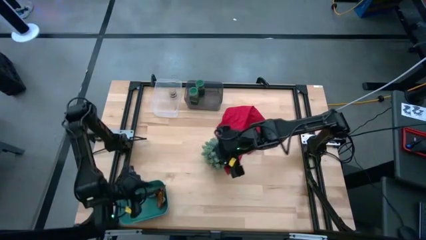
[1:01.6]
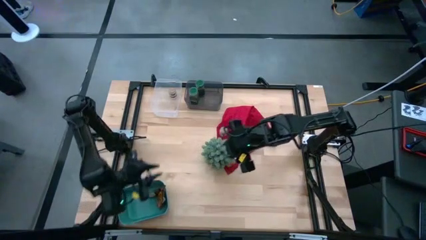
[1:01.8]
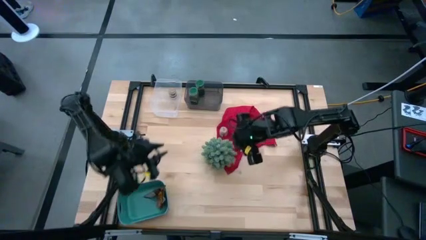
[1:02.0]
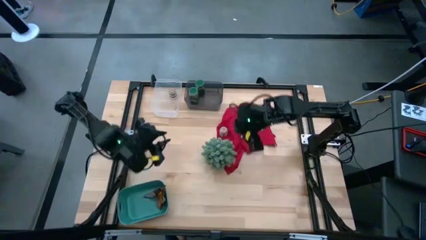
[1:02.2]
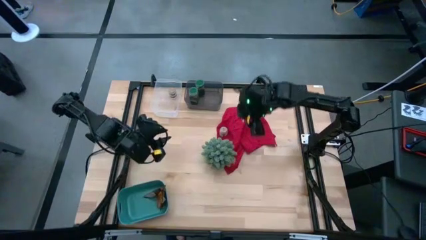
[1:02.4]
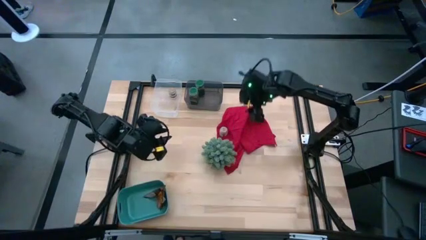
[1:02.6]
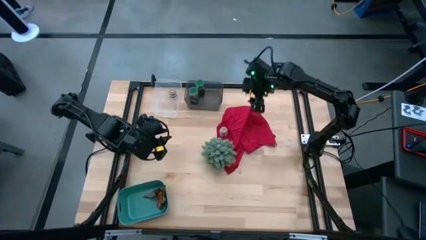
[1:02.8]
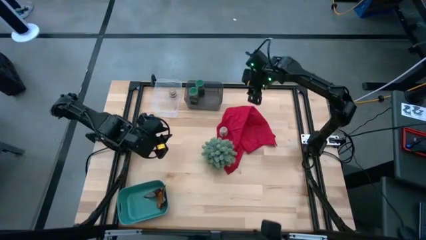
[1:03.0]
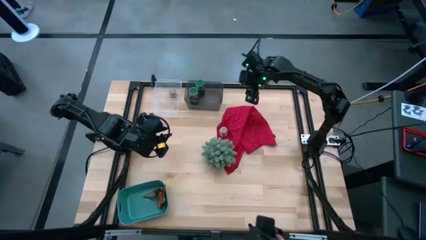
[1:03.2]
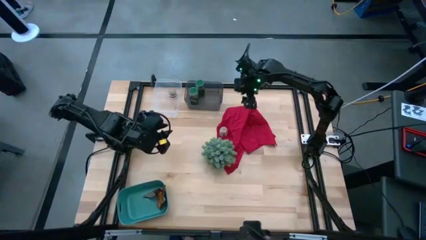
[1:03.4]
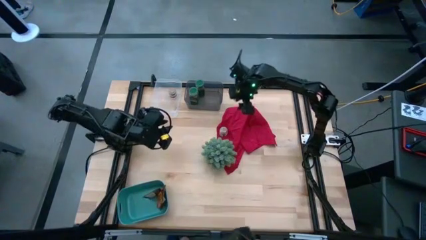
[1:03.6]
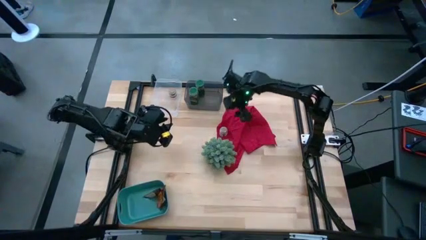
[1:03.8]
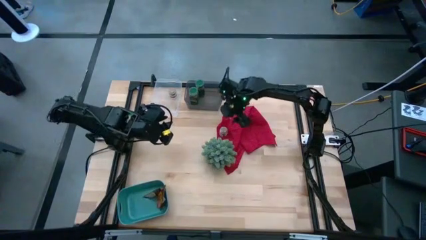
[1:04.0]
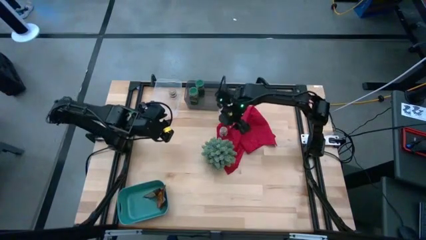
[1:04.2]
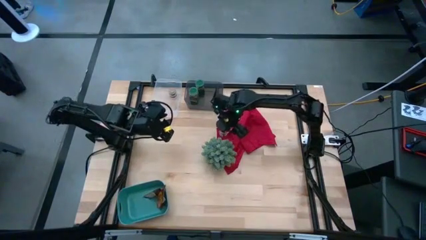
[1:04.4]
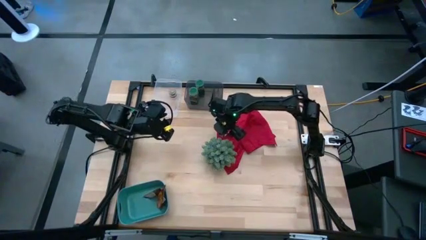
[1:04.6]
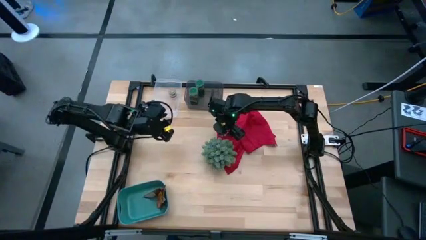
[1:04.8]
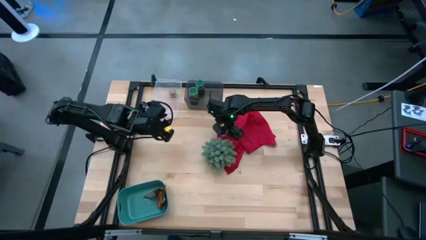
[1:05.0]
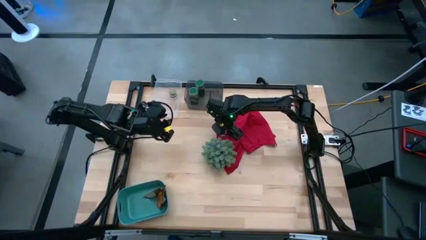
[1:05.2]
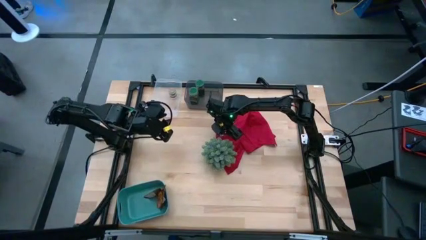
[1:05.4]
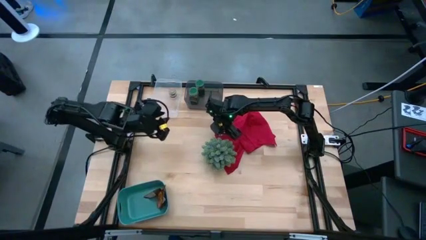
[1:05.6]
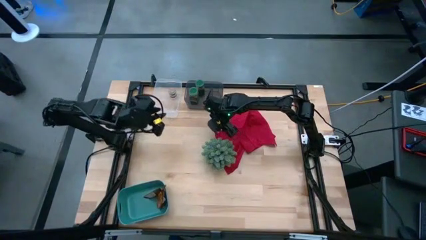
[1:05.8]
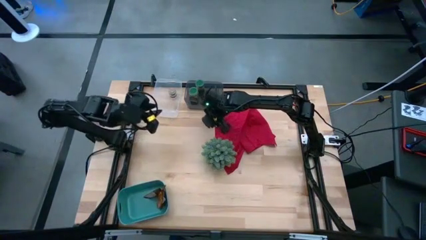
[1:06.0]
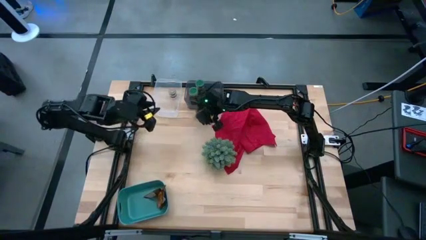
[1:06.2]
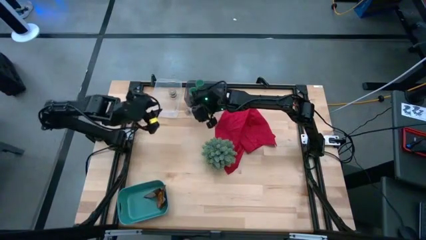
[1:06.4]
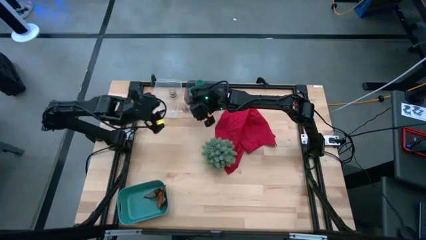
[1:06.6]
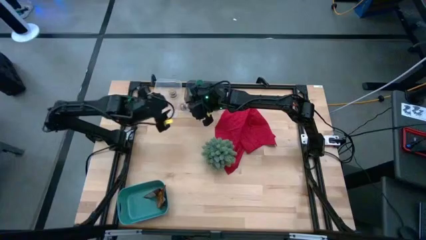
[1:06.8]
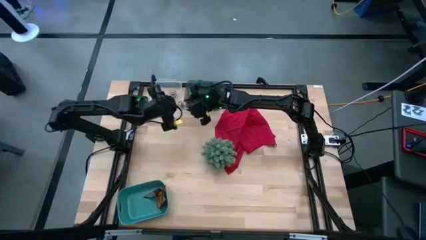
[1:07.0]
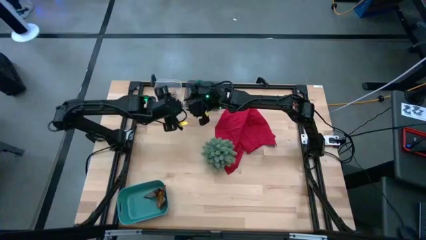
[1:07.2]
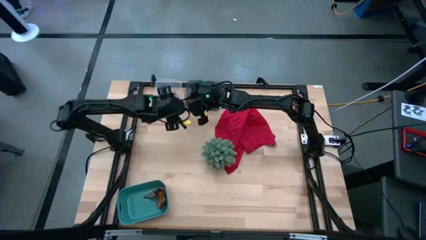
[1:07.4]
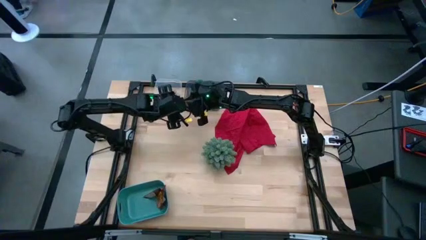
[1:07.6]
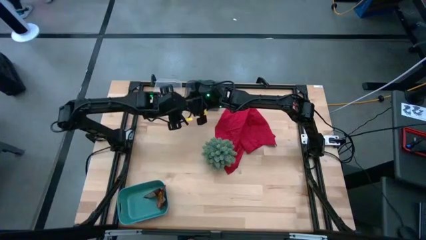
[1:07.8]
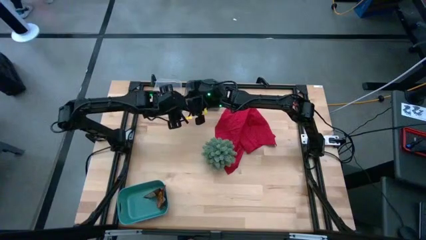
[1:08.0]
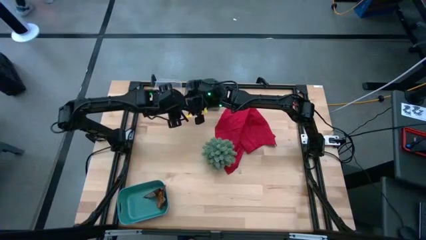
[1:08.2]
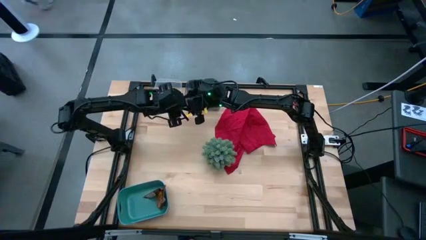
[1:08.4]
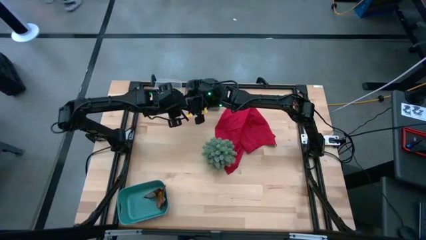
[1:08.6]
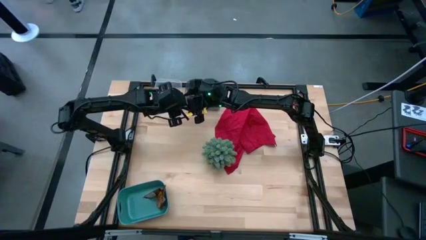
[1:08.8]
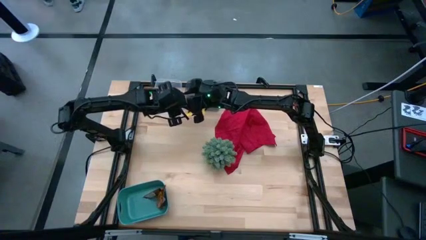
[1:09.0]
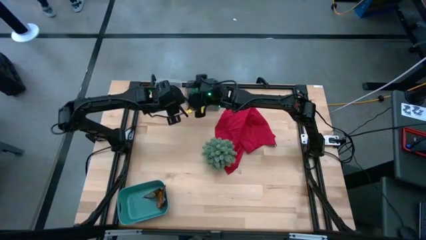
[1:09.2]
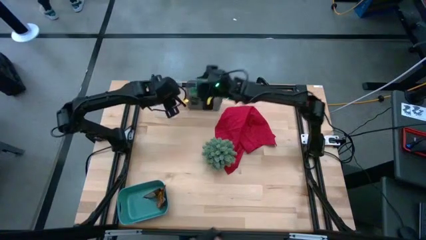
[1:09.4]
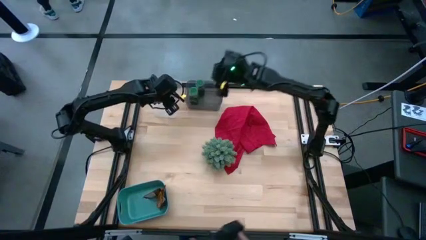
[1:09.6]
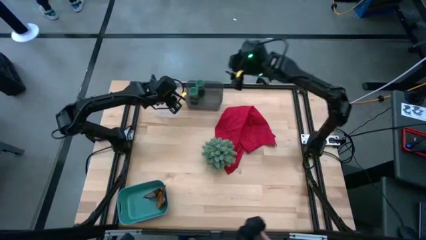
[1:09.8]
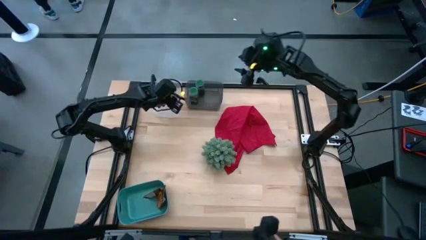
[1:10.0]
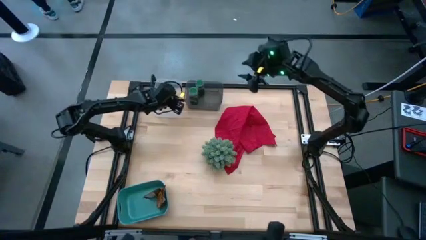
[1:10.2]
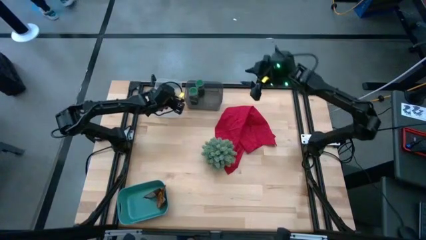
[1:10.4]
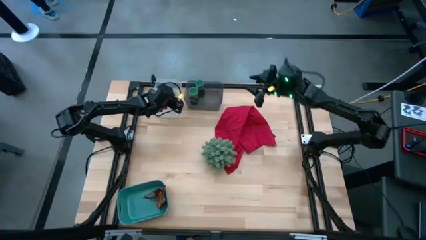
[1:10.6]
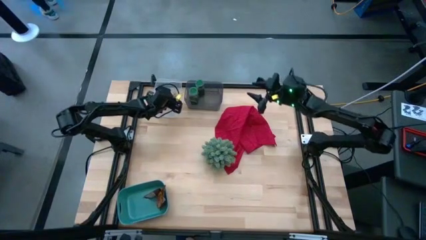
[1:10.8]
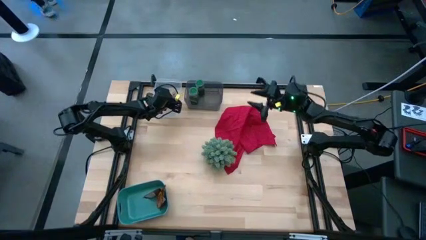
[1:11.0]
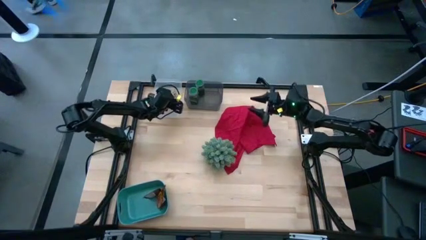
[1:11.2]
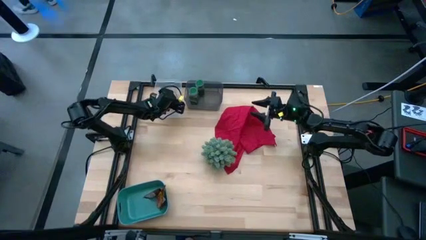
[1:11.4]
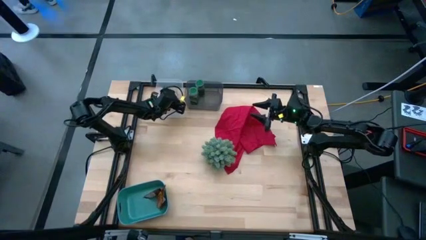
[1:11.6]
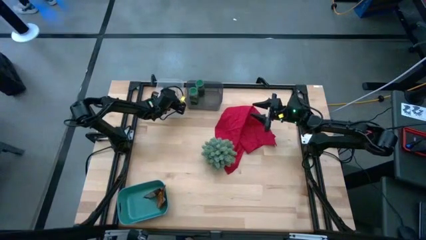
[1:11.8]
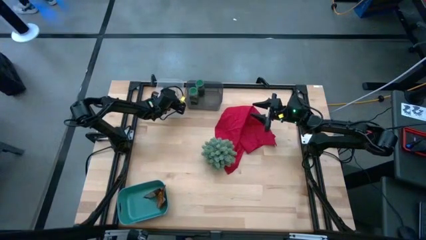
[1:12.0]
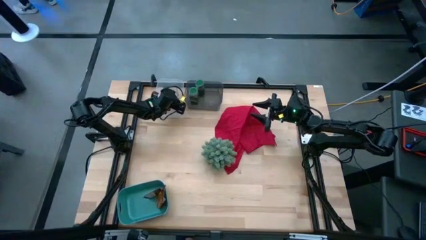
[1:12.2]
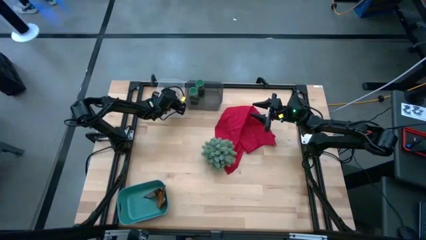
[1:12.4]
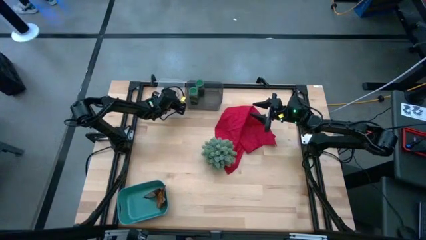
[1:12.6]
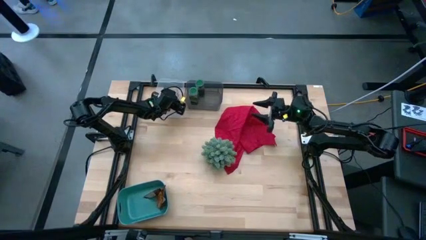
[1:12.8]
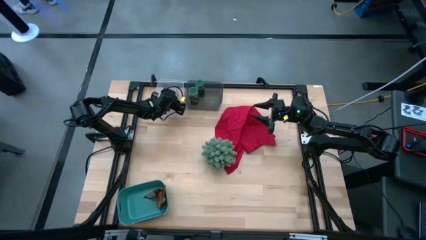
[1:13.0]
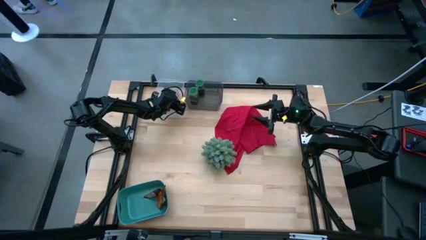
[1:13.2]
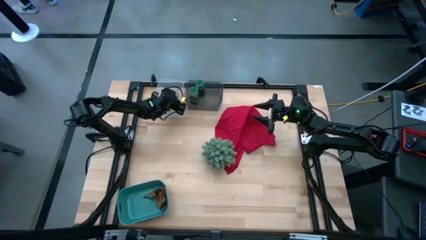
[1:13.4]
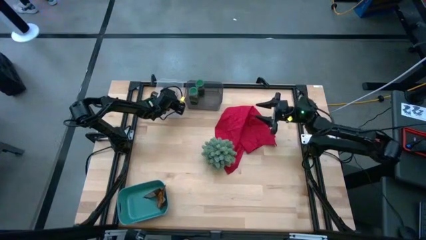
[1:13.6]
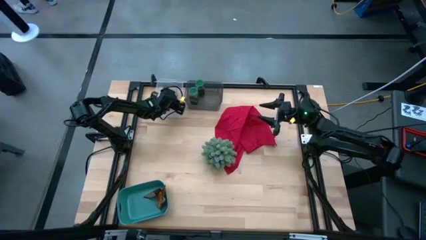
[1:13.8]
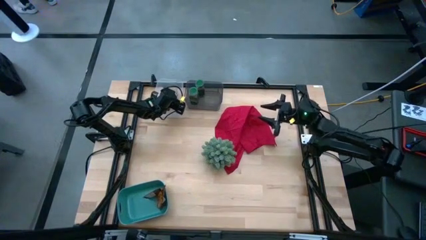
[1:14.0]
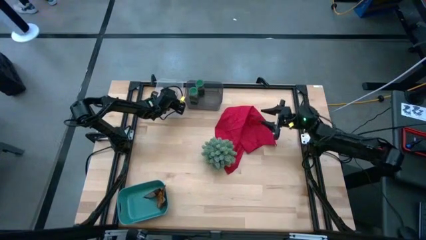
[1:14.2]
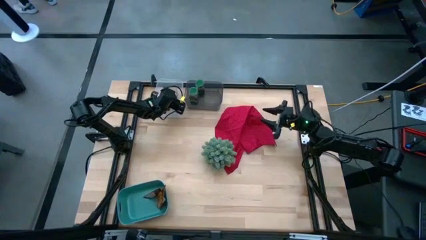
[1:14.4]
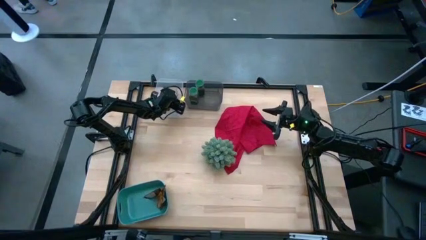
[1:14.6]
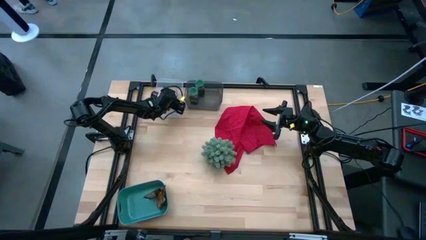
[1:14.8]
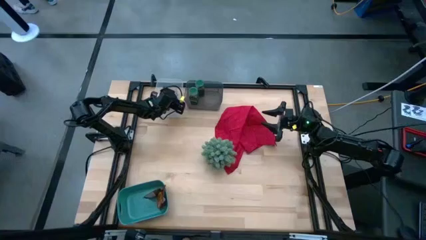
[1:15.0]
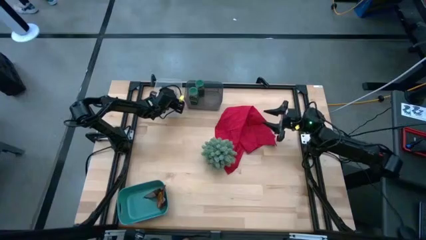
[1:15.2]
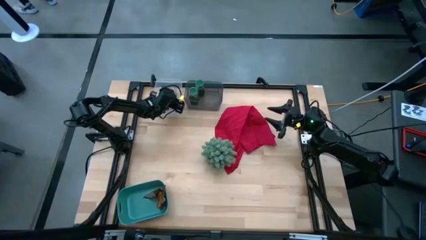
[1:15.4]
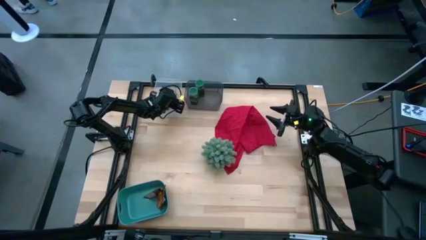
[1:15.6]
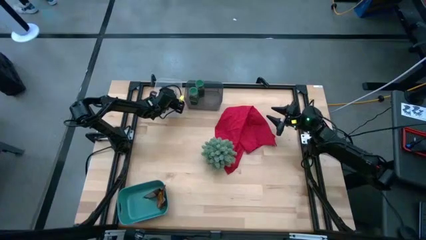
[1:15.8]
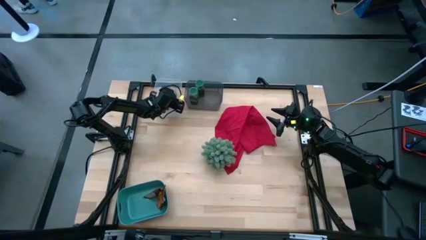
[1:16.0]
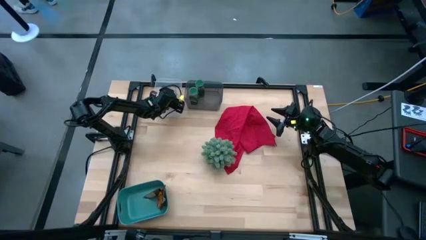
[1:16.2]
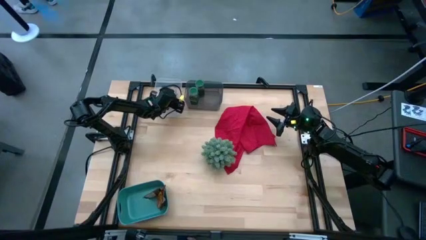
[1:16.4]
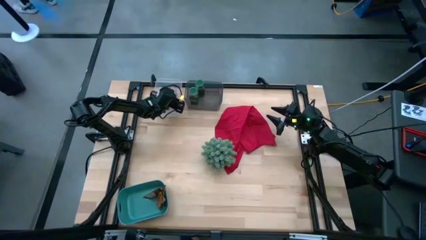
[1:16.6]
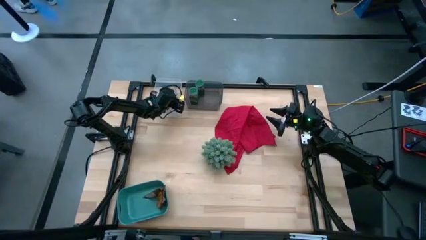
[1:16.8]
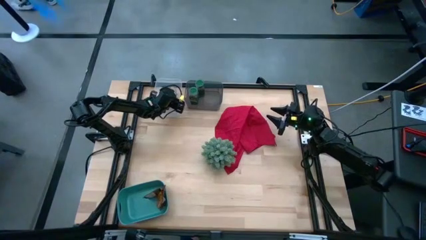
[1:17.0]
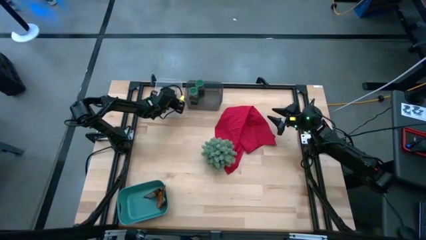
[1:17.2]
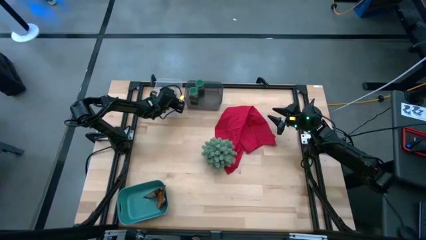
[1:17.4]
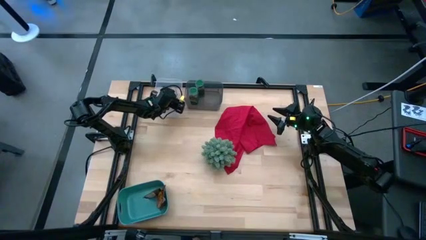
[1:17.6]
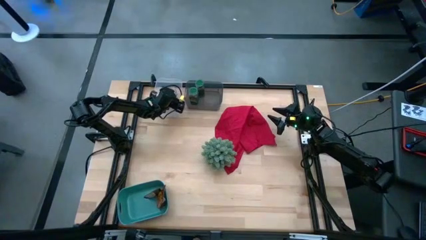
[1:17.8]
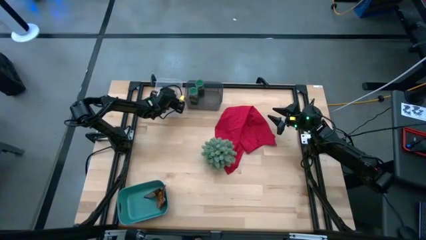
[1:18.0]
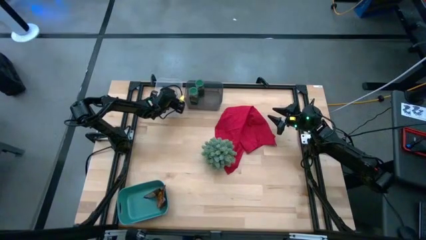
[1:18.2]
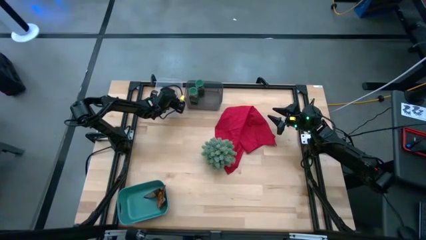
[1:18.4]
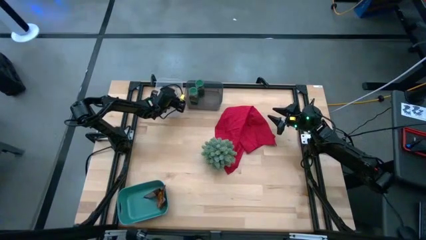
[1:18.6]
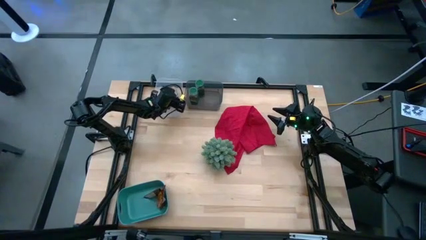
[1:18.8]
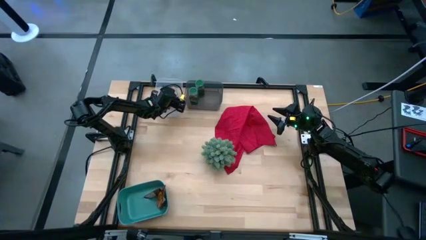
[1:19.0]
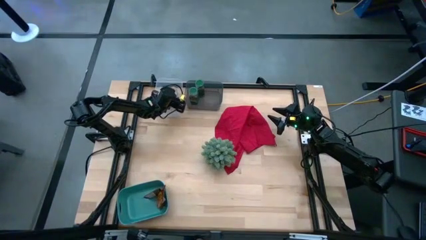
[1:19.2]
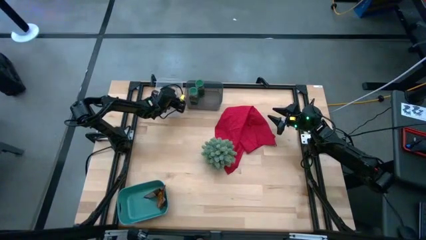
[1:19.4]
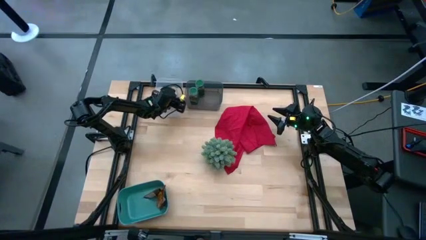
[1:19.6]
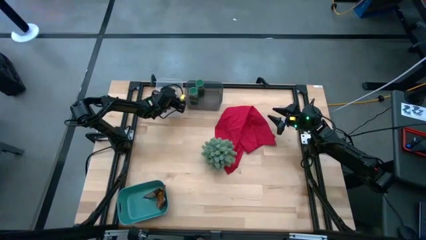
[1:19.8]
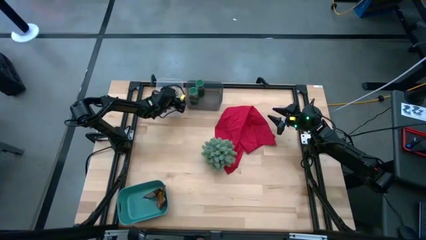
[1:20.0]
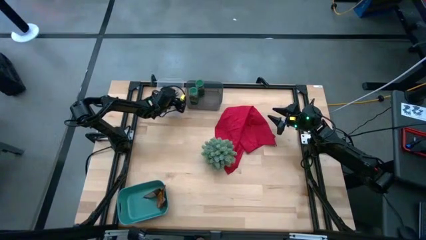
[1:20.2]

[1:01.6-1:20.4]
Task: Sort spices by type
Put the brown spice bottle into the transparent bin
